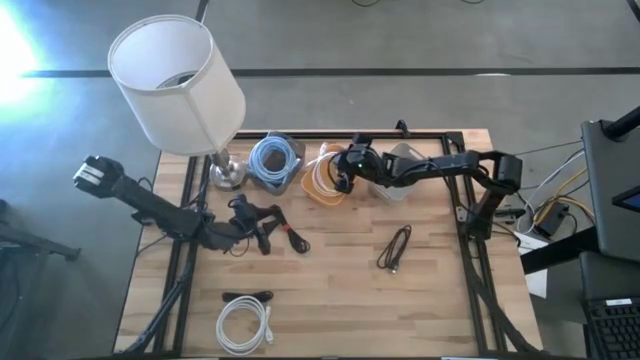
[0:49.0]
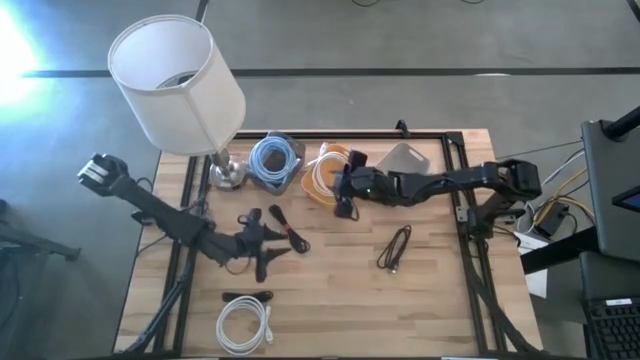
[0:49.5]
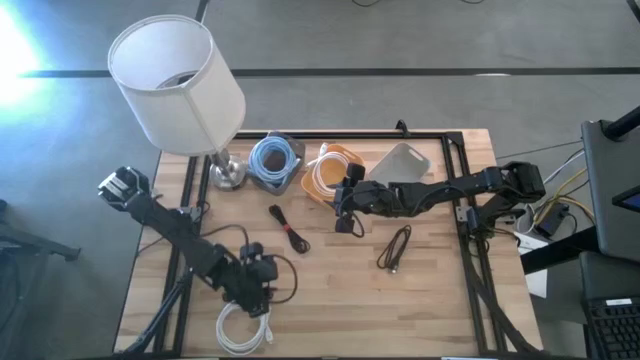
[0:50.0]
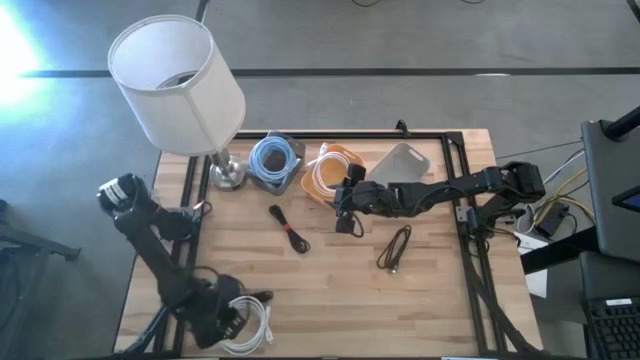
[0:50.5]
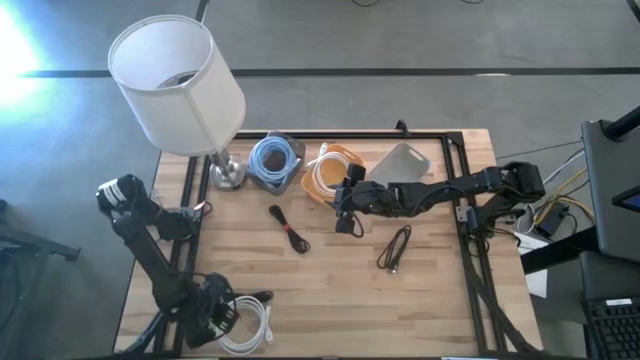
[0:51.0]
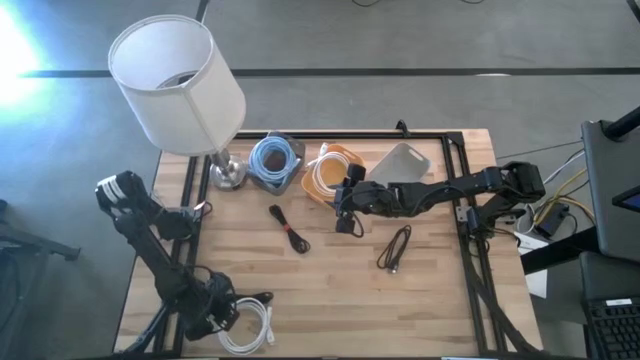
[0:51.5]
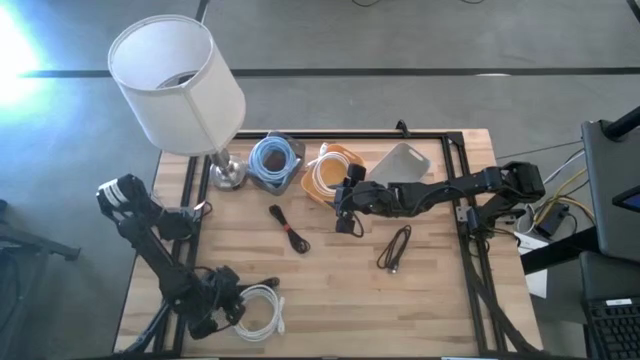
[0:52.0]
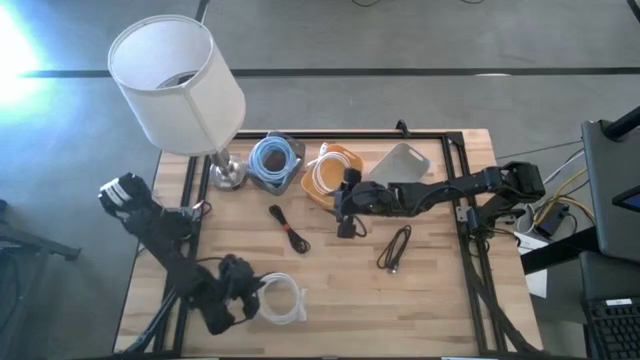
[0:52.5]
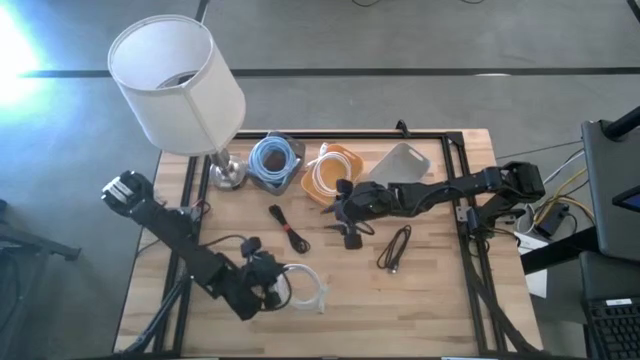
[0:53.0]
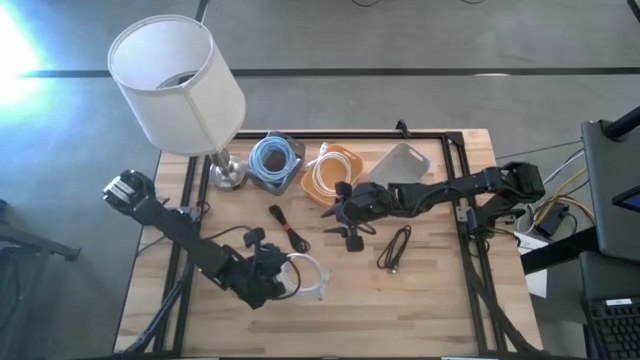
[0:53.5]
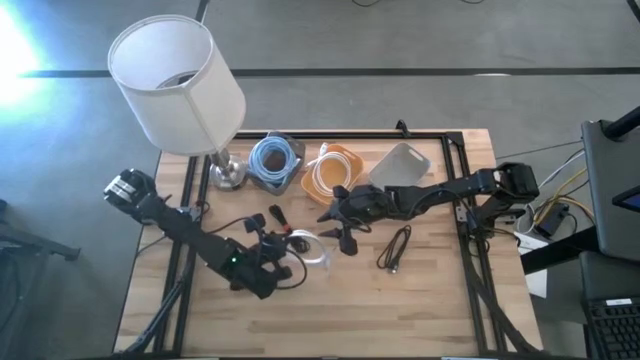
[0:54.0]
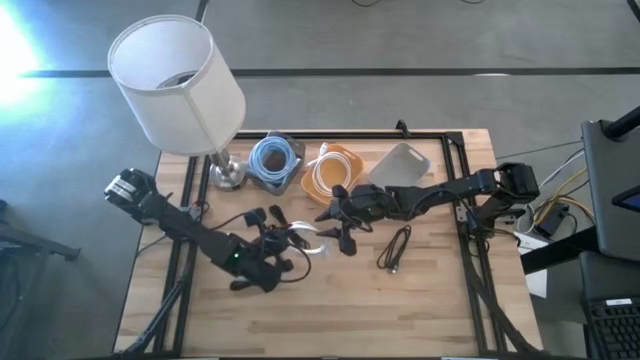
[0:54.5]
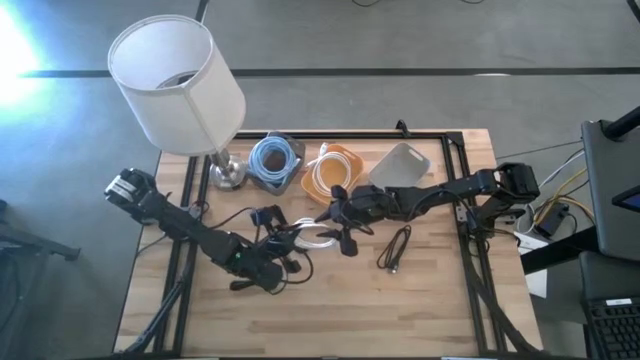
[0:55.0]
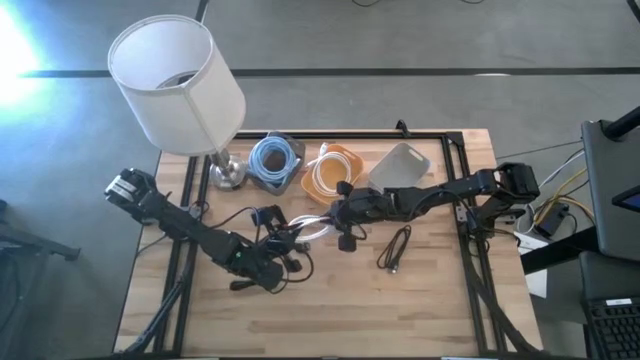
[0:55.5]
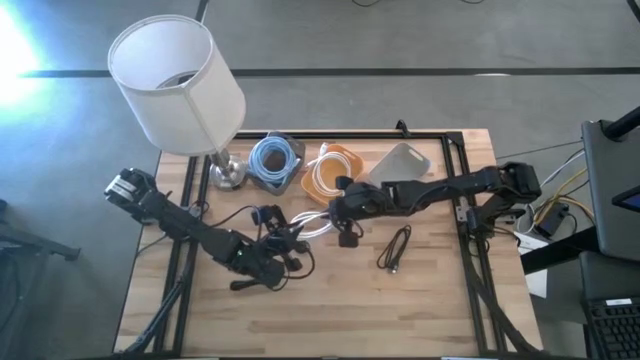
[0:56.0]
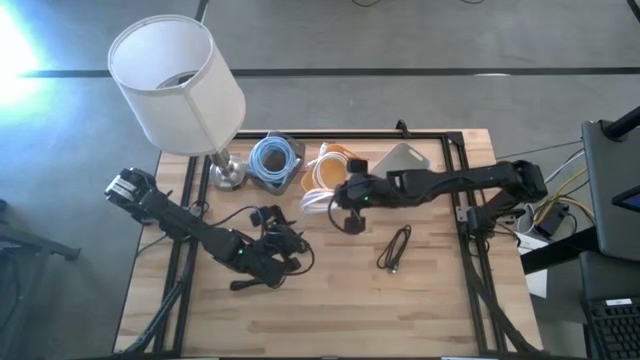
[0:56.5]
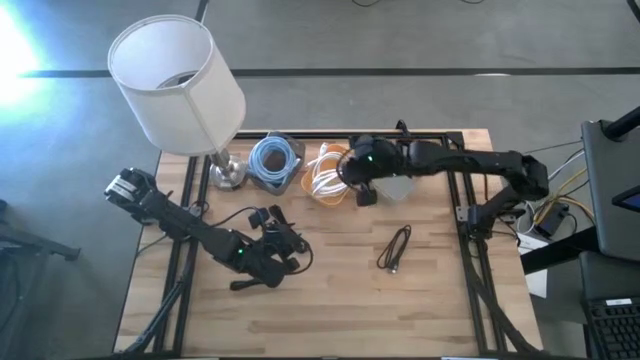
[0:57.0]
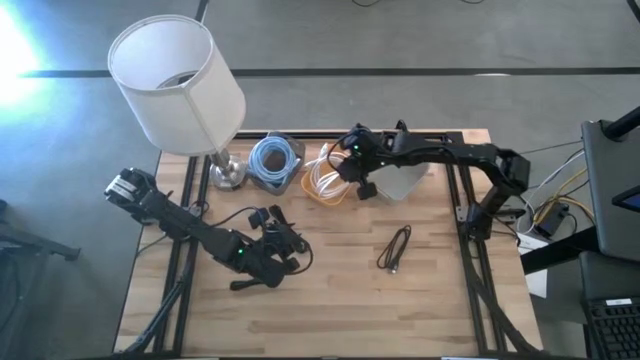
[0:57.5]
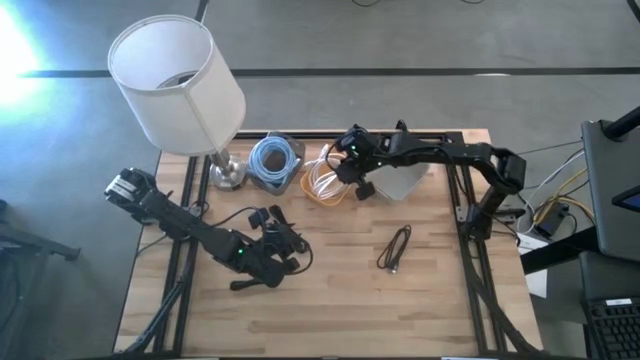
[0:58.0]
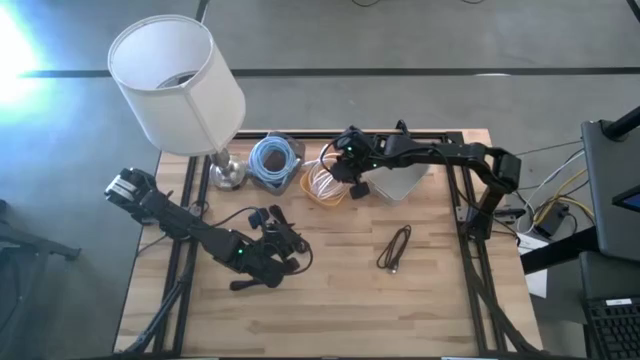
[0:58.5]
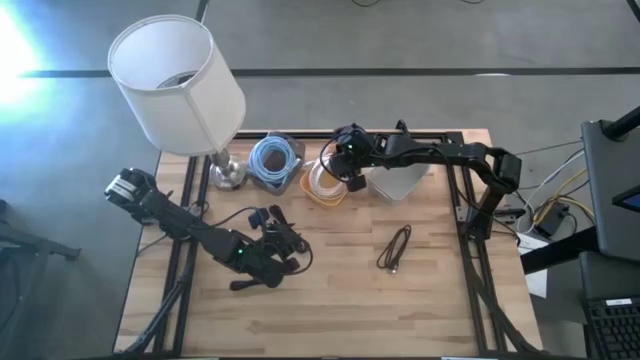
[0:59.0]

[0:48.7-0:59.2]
Task: Pick & Place USB Port
Put the white HDMI cable into the yellow bin

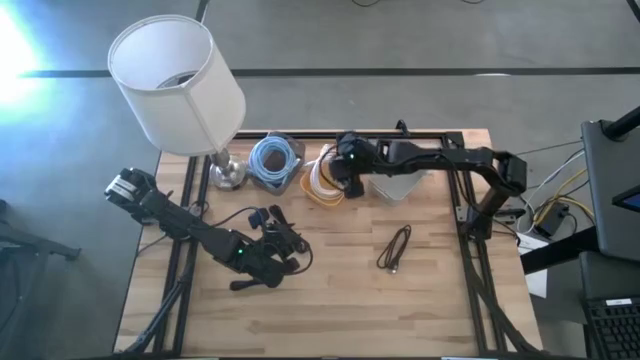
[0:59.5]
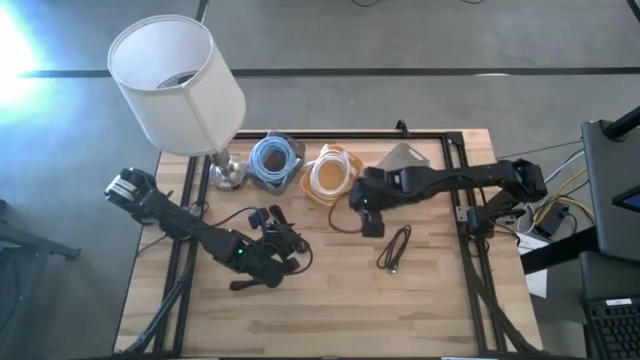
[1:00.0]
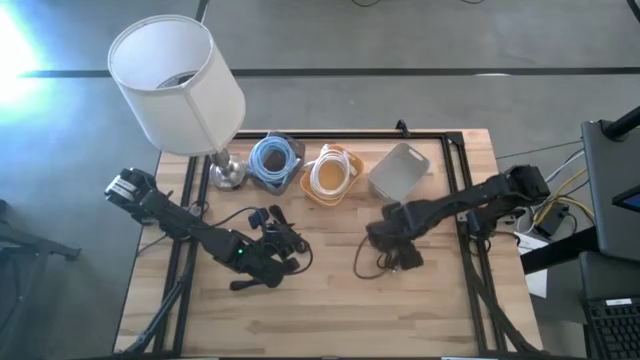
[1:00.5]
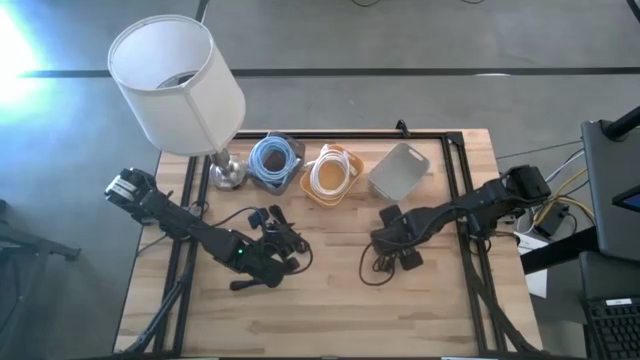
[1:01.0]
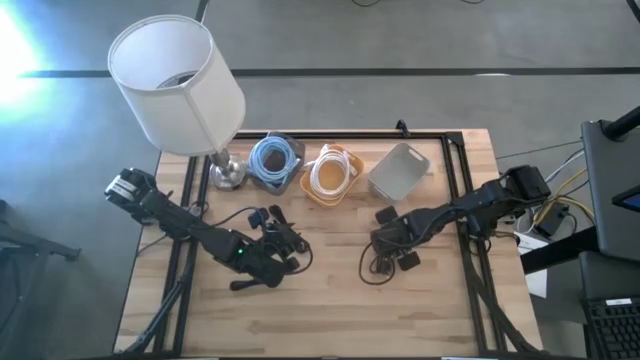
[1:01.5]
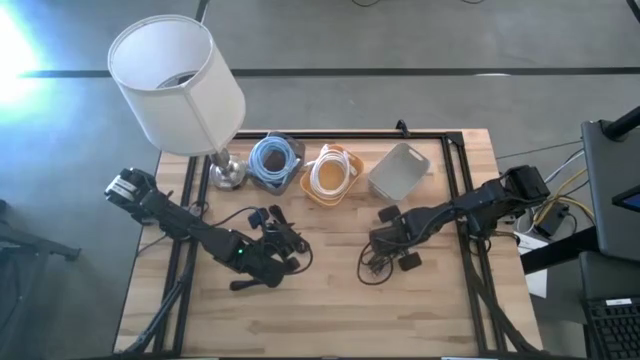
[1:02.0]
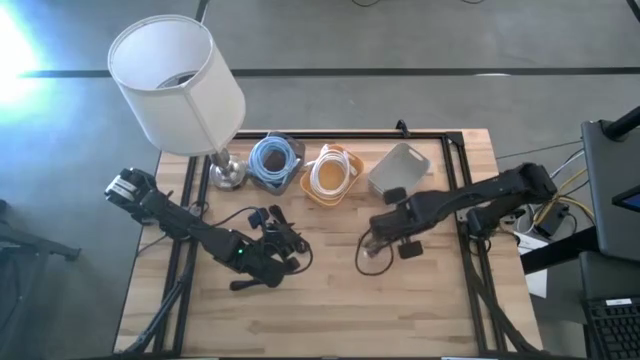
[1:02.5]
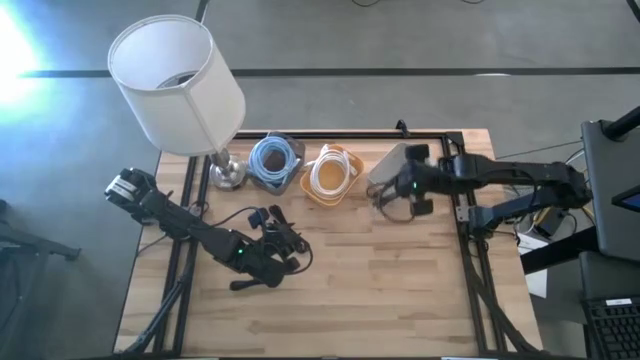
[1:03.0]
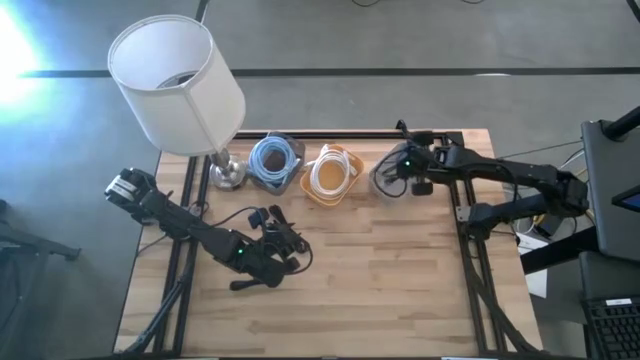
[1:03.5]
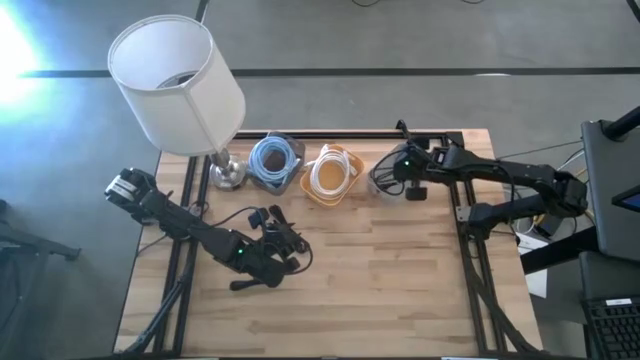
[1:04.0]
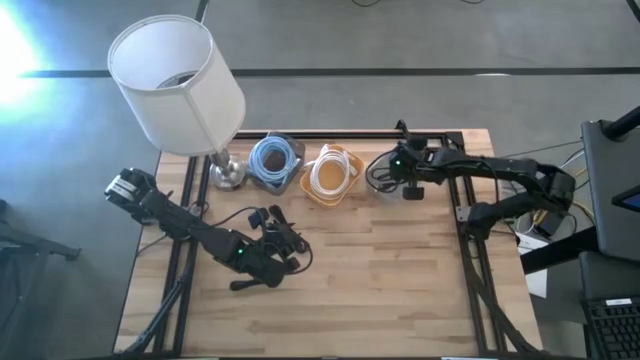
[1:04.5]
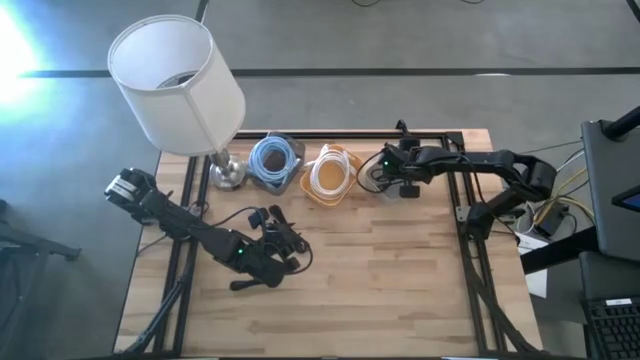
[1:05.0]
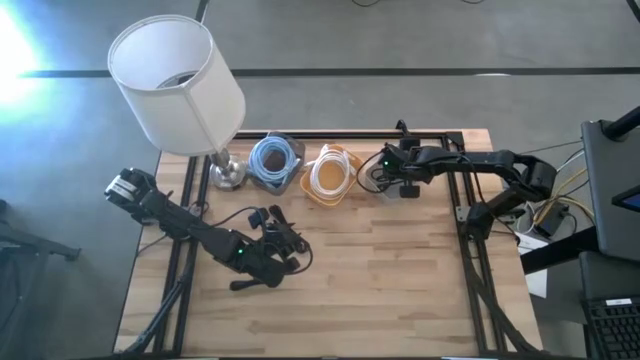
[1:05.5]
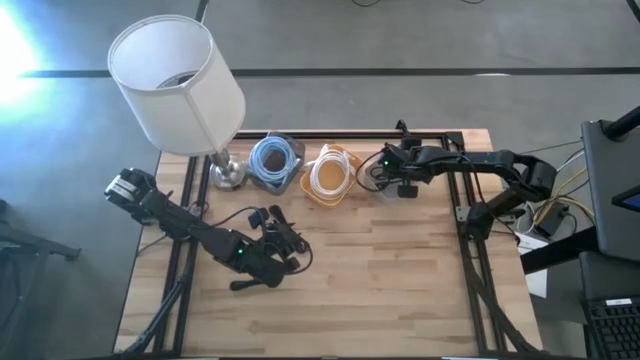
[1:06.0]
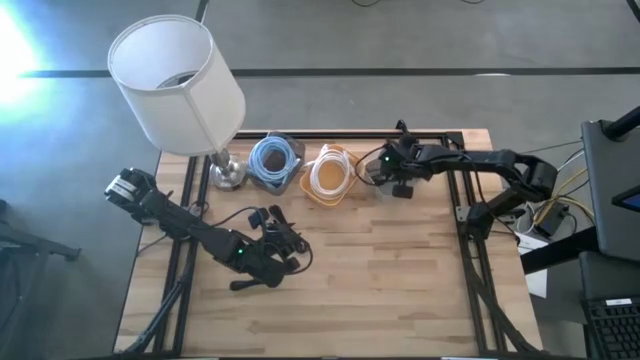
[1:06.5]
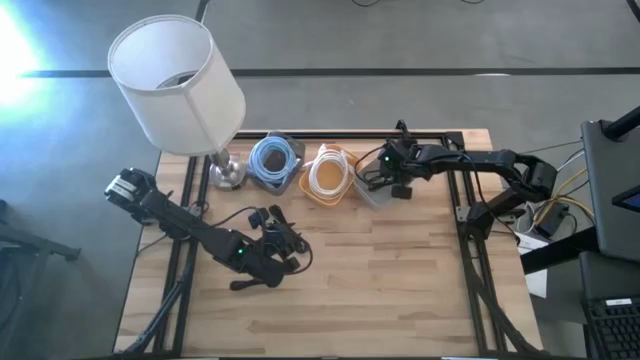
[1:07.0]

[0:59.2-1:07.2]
Put the bottom right black charger cable into the gray bin

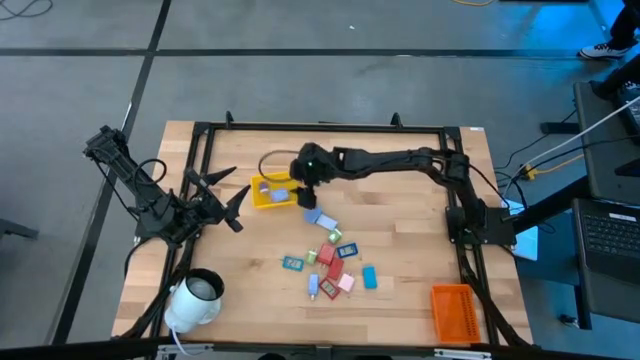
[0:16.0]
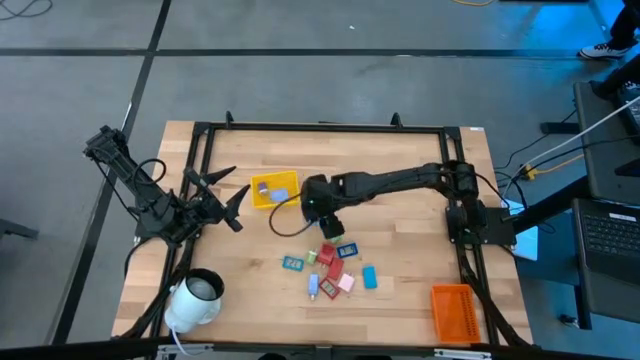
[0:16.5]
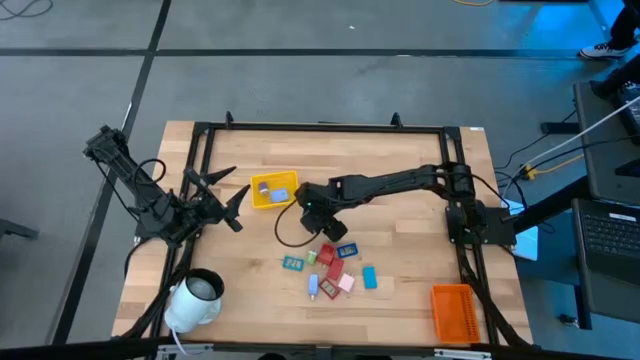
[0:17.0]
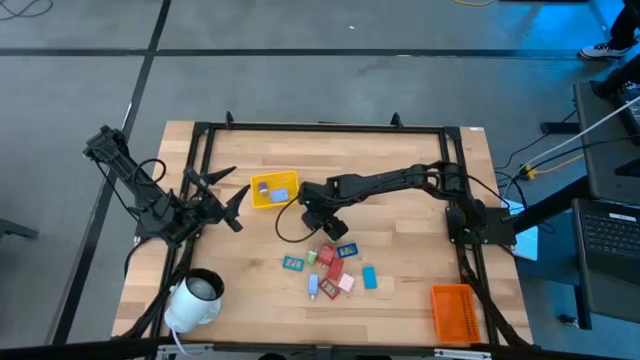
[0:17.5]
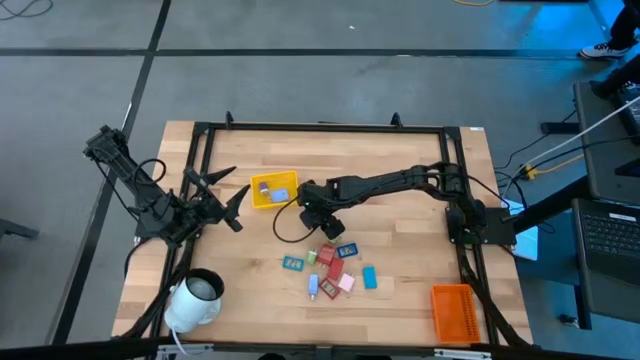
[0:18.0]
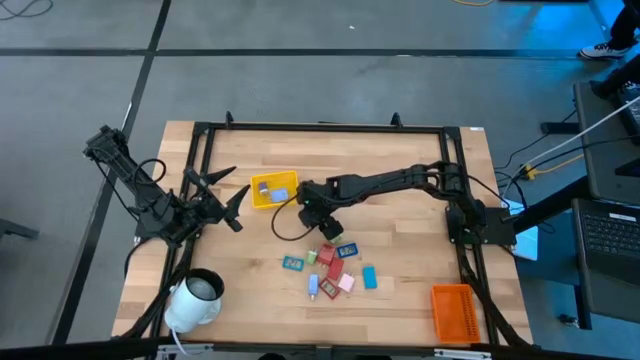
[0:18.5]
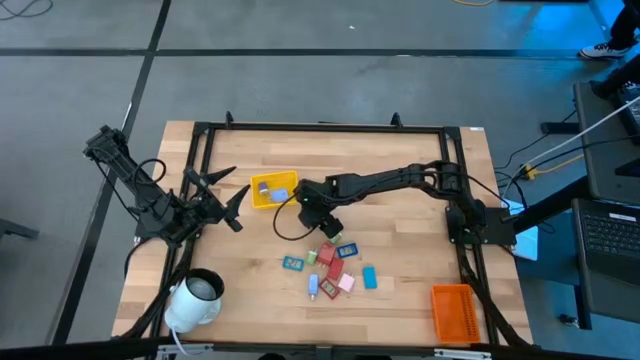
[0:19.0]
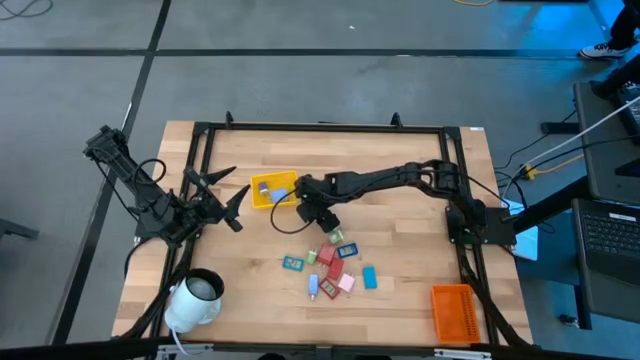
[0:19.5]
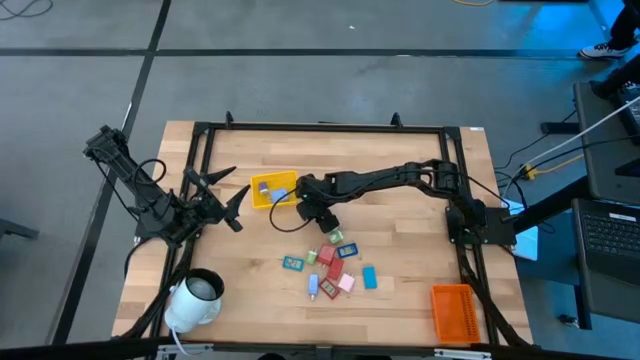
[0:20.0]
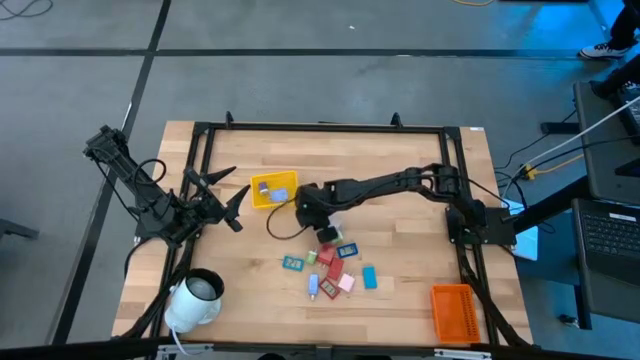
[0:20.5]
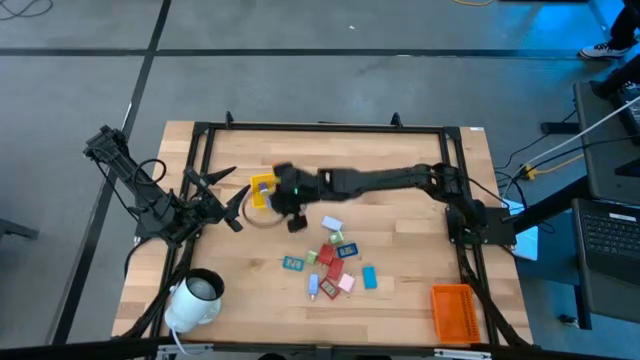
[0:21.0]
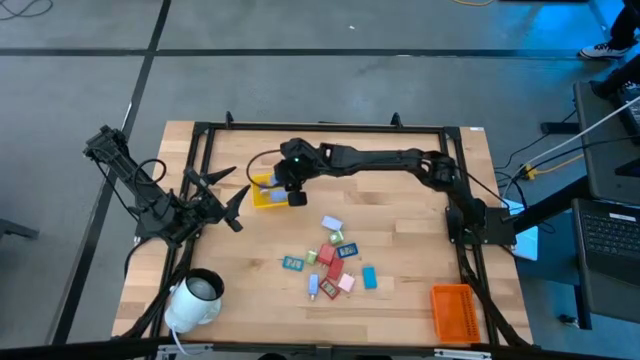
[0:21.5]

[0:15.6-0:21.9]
Task: Pick & Place Office items
Put the top light blue charger adapter into the yellow bin
